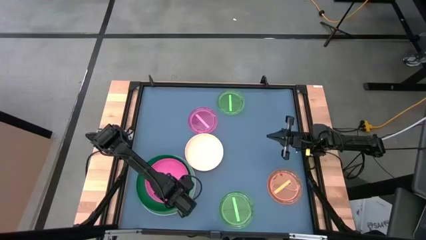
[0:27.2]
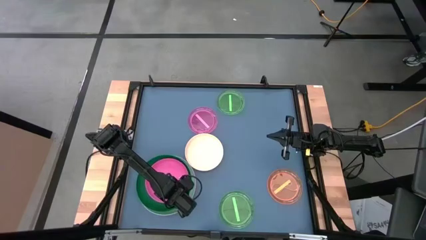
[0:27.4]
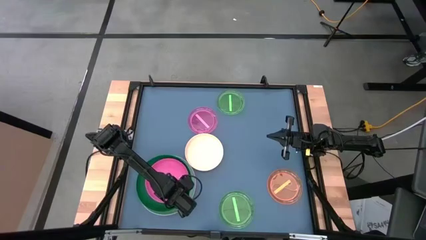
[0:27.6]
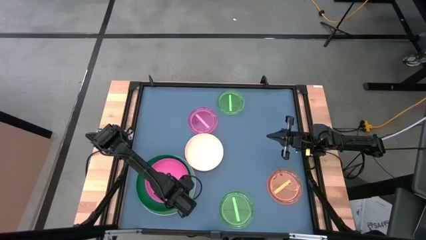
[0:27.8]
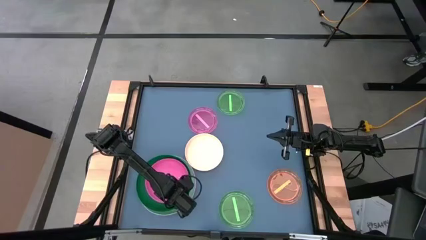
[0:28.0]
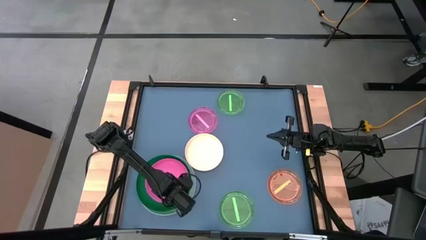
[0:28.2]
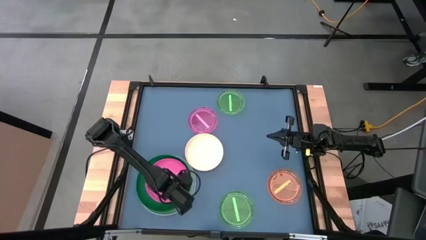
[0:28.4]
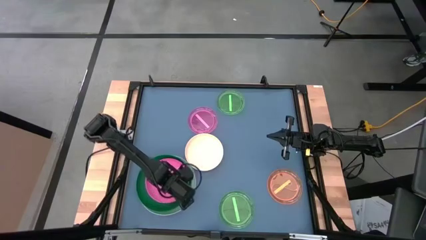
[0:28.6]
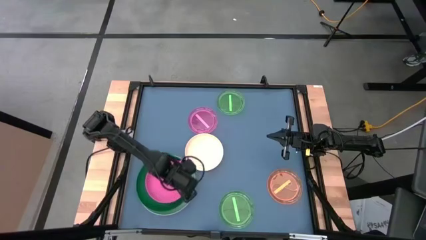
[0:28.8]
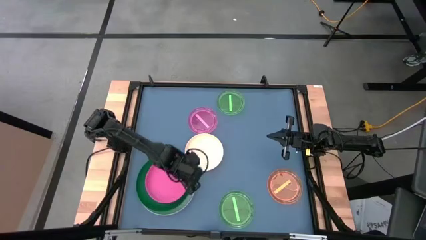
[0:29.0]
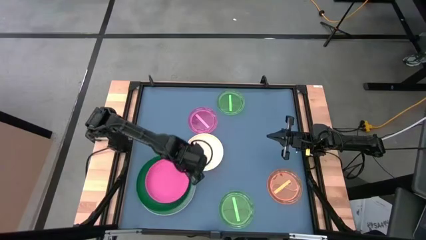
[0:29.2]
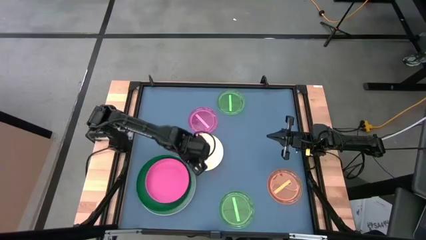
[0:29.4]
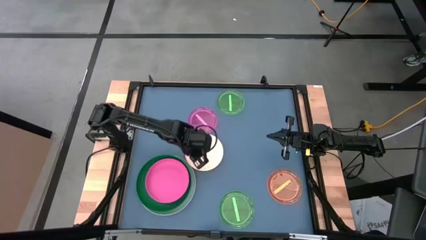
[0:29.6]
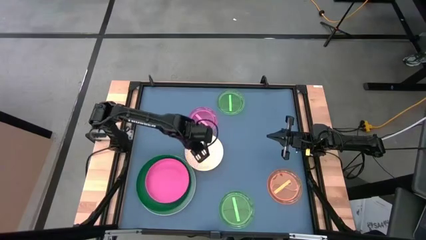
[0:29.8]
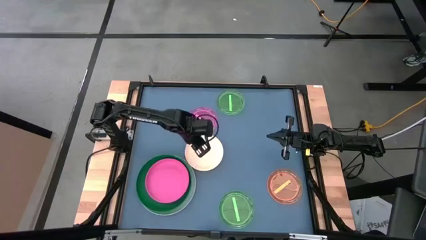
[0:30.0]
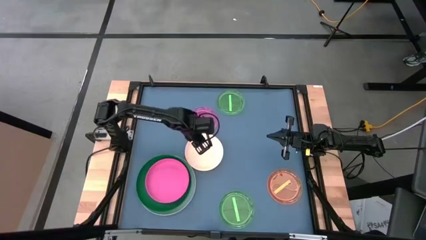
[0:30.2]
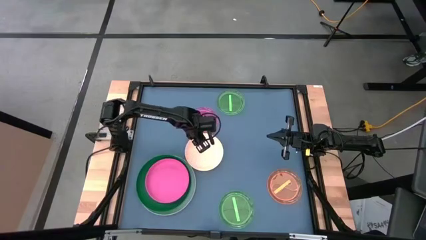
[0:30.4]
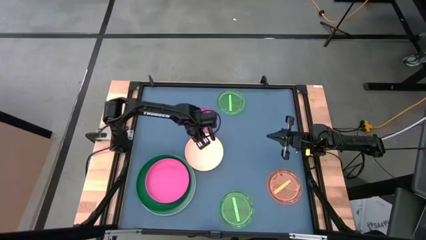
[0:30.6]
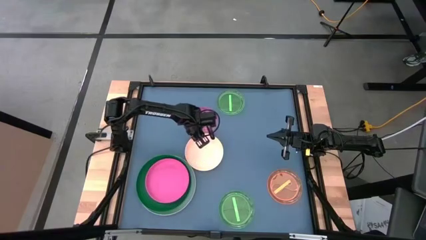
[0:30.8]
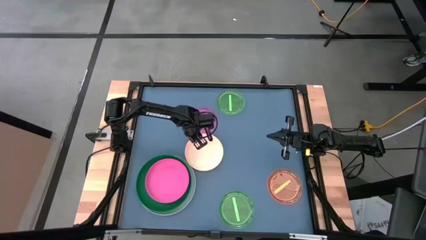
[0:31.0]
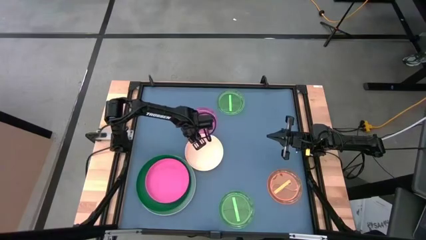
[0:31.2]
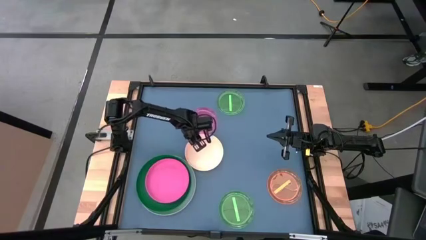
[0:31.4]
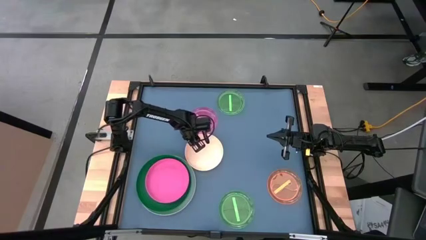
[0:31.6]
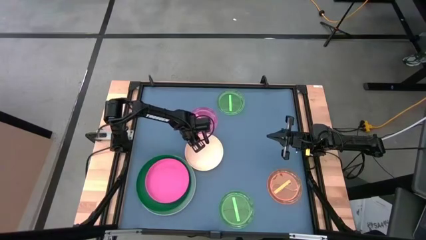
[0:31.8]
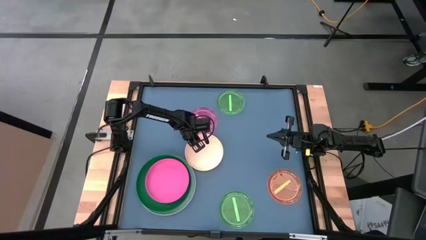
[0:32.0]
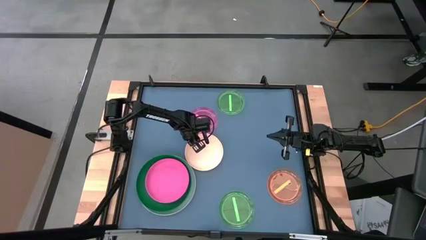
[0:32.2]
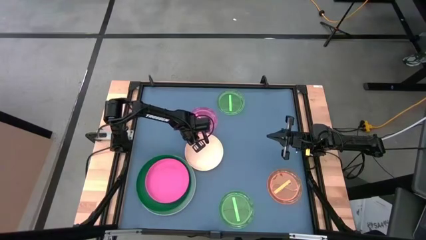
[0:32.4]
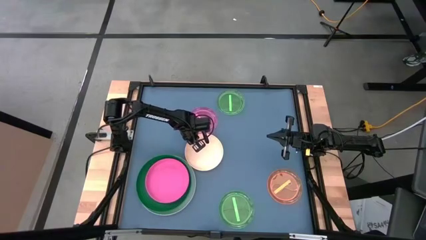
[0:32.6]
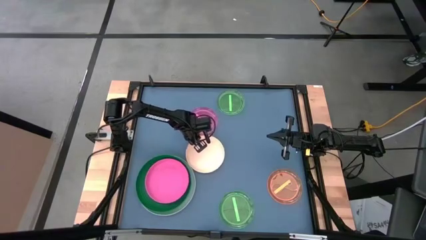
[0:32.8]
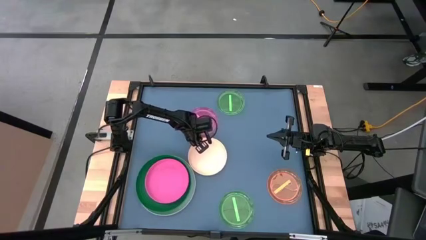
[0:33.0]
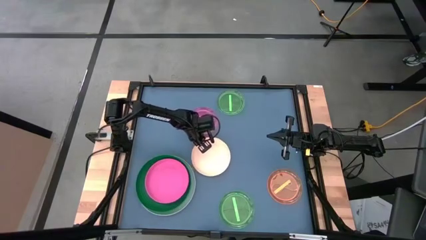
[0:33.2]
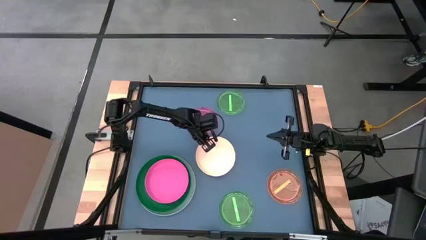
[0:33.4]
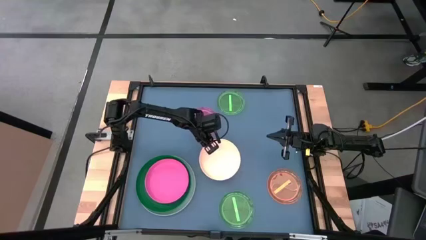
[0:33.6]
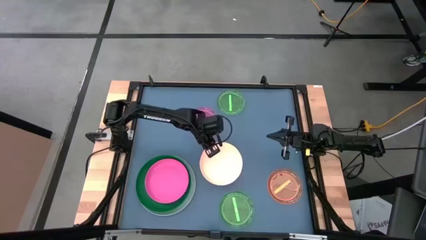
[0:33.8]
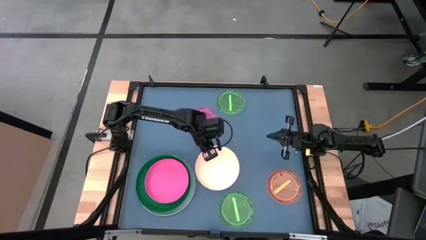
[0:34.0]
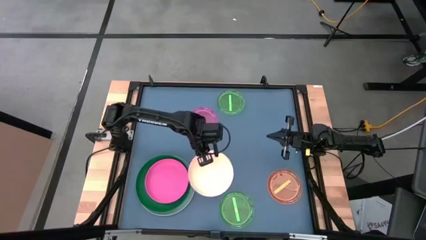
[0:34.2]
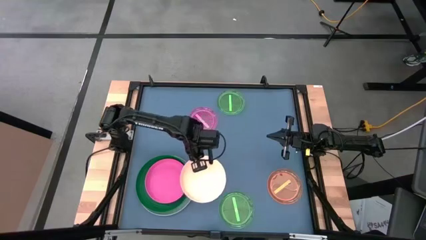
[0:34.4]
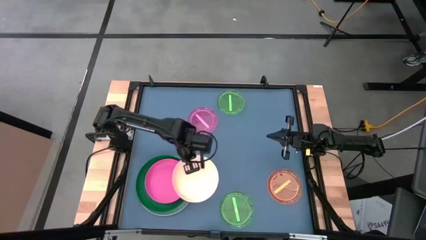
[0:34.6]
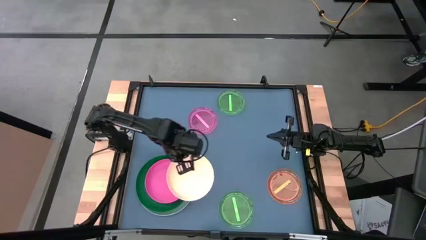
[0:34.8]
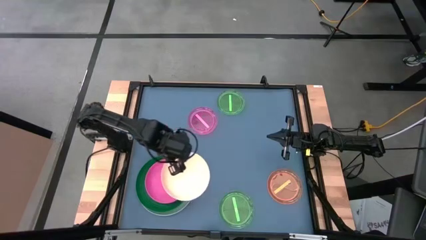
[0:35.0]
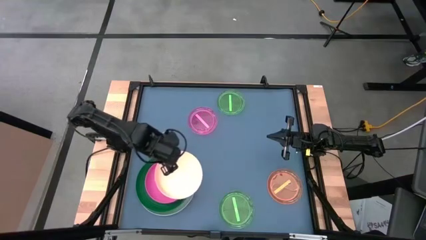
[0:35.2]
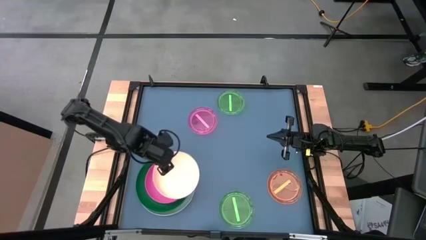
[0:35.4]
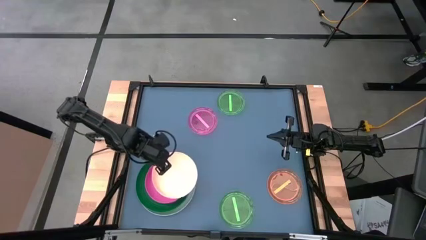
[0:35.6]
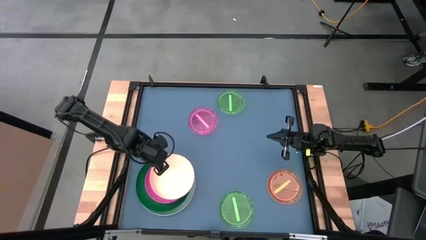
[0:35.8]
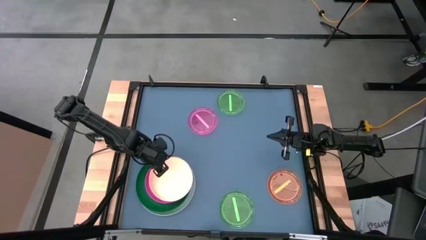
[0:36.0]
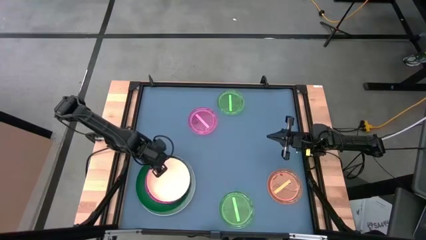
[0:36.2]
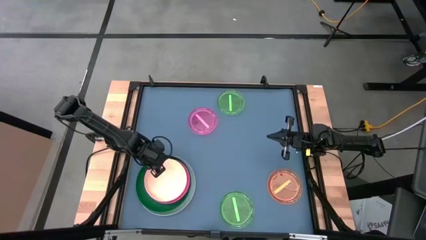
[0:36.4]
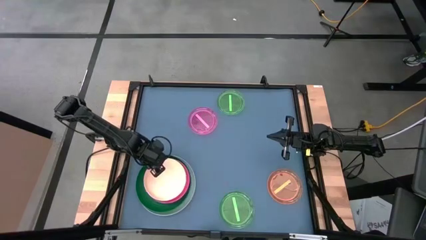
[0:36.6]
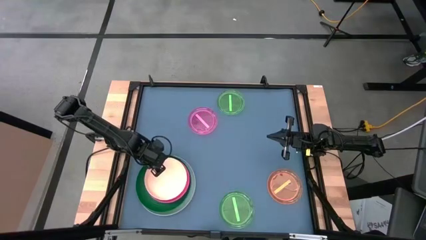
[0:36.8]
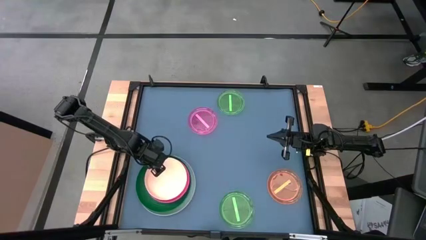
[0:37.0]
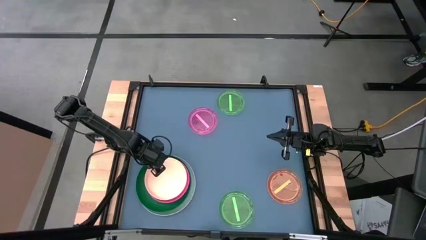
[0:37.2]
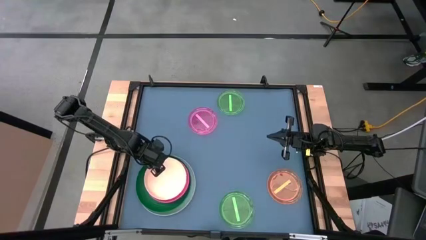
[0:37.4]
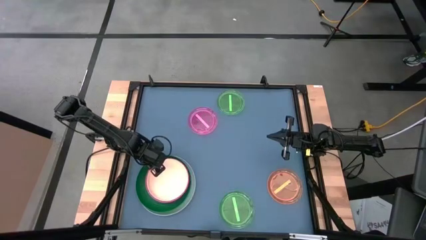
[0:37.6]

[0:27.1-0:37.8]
Task: Stack plastic plates
Stack the white plate on top of the dark pink plate

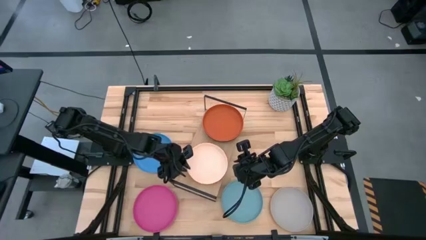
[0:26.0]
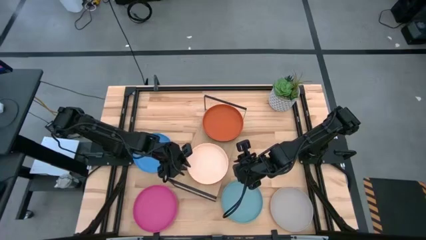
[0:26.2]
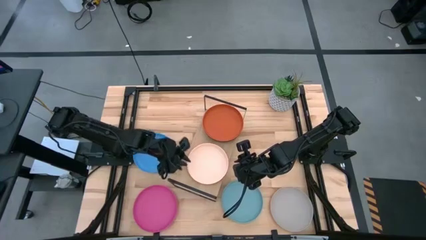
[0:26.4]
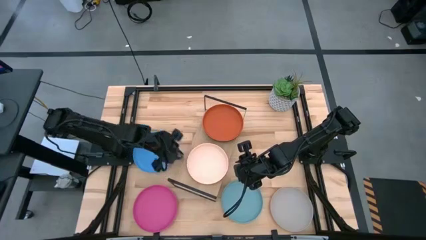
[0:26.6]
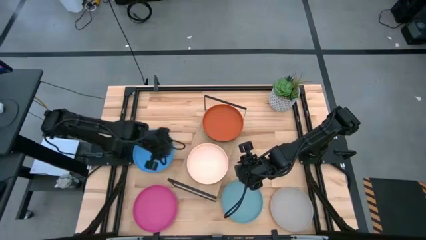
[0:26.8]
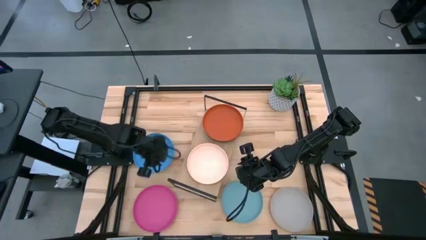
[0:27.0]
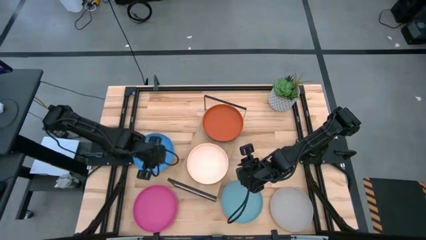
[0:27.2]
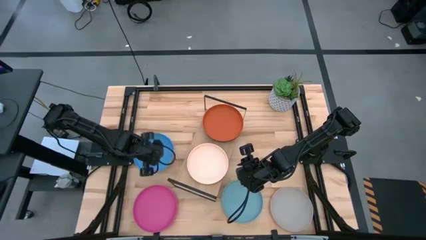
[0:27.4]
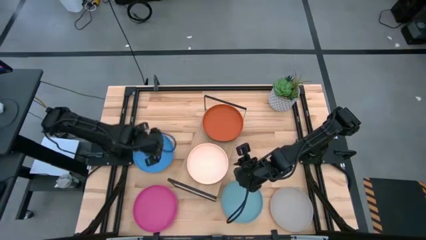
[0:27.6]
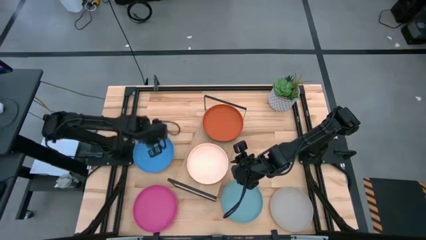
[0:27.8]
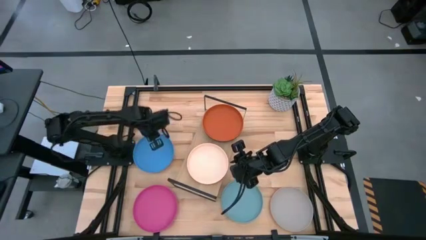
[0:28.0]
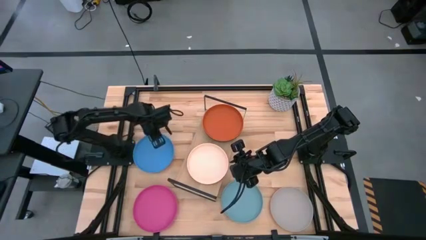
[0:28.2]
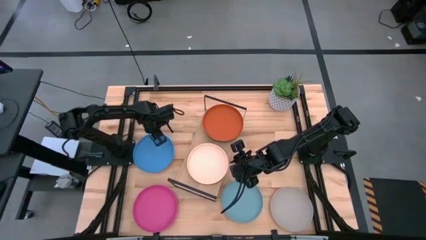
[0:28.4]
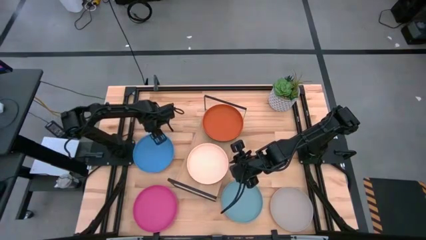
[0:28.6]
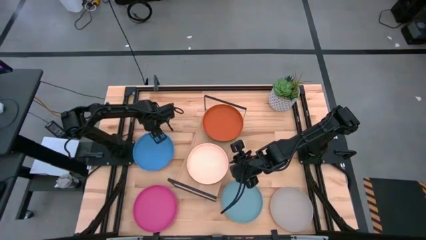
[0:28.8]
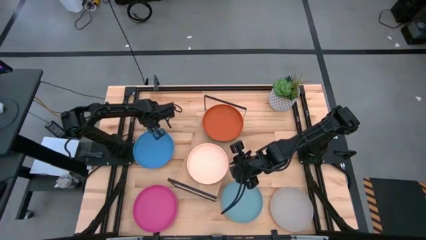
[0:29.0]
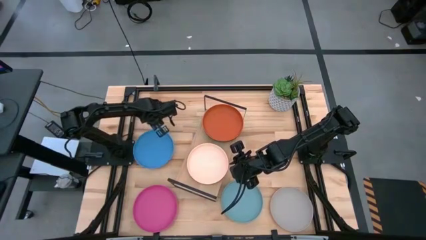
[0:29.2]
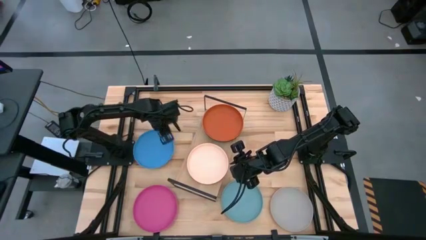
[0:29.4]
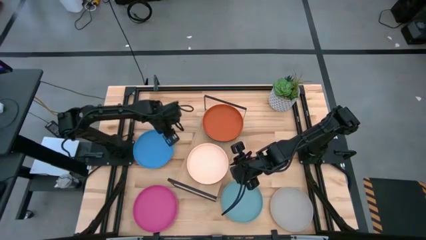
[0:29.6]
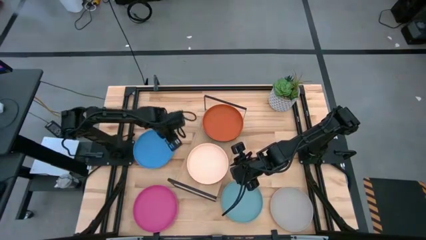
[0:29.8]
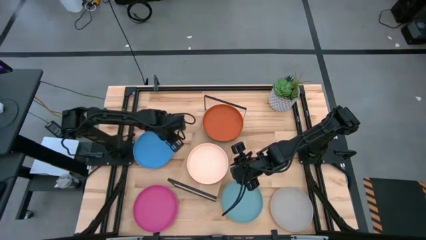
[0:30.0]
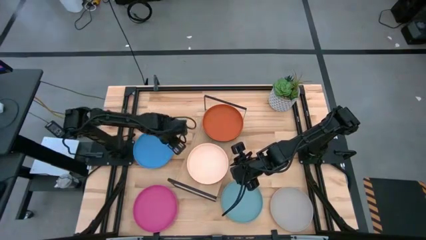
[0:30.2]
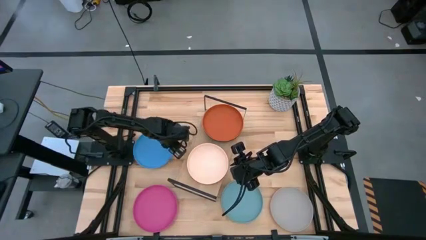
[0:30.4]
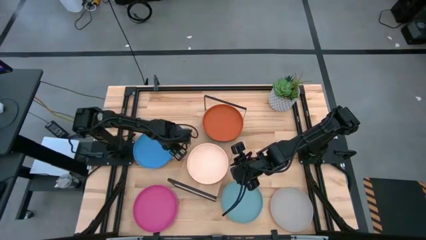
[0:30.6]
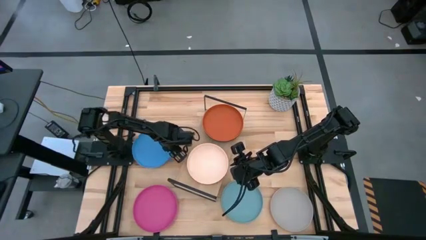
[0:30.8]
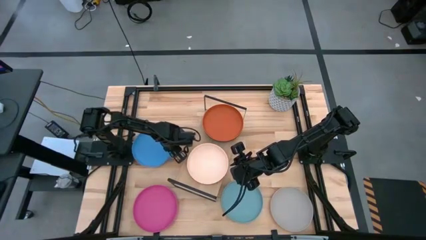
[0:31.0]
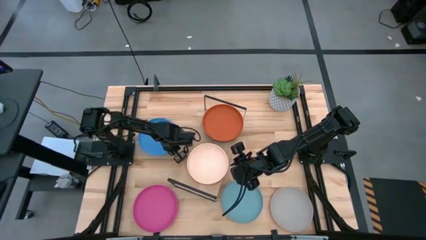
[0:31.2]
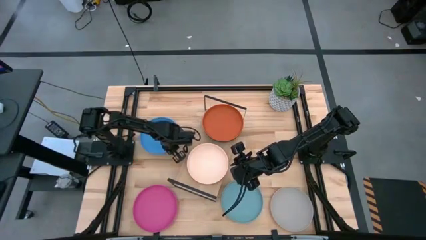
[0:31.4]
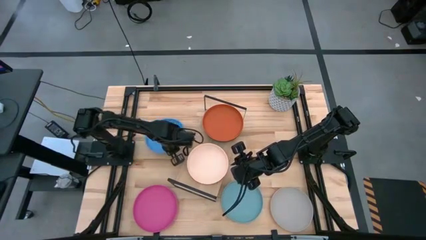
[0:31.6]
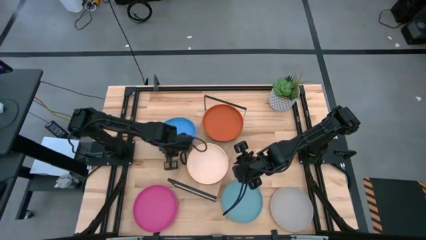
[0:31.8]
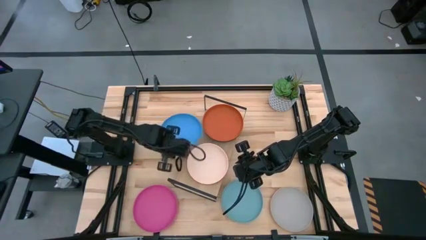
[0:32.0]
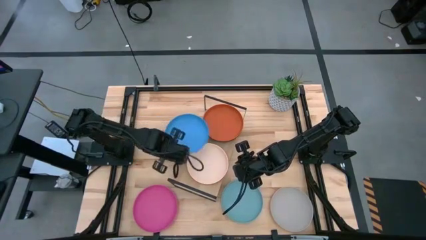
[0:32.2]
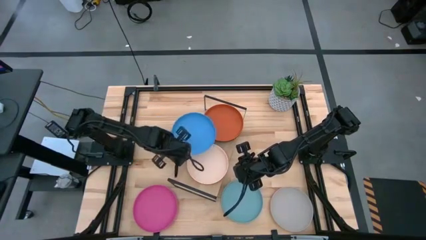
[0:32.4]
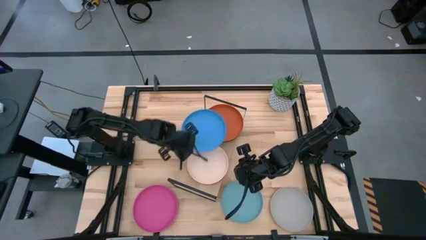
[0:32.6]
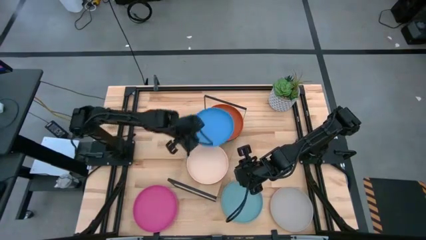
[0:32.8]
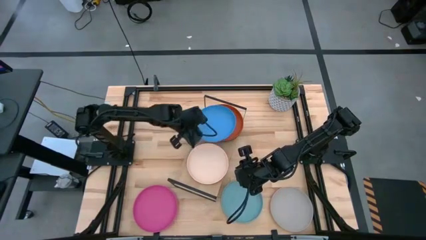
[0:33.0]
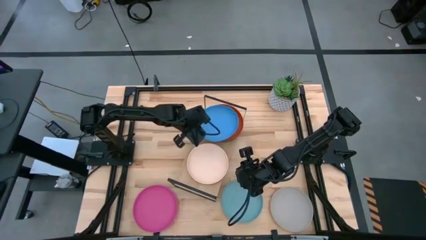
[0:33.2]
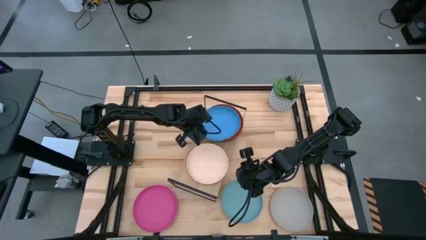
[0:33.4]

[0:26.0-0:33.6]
Task: Place and stack plates onto a shelf
Stack the blue plate on top of the orange plate on the shelf
